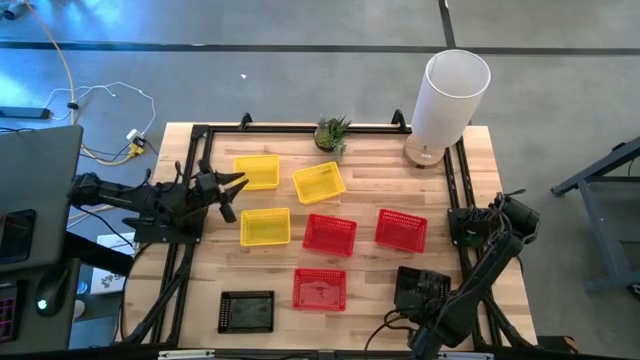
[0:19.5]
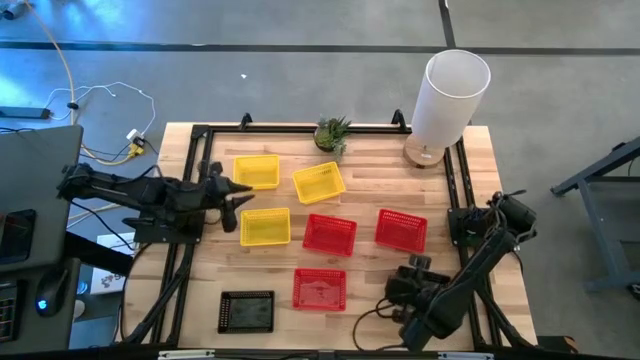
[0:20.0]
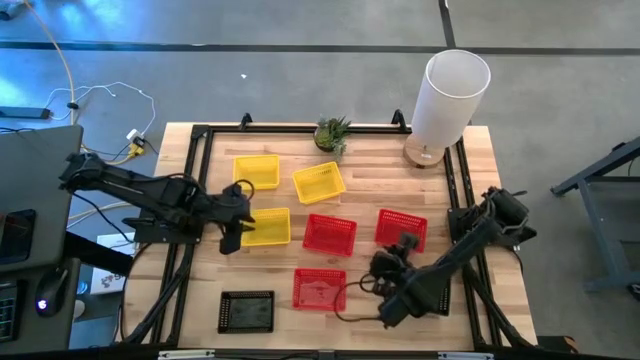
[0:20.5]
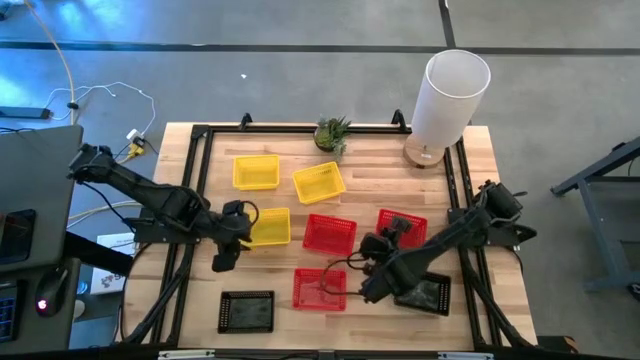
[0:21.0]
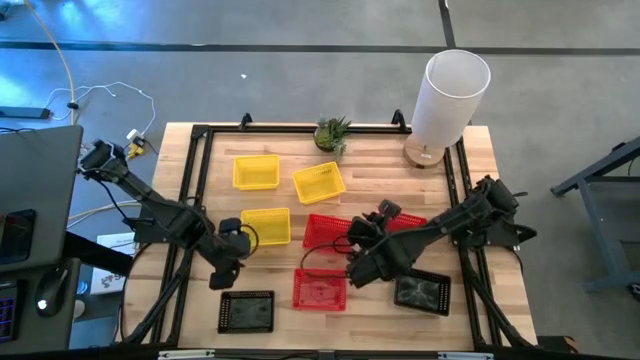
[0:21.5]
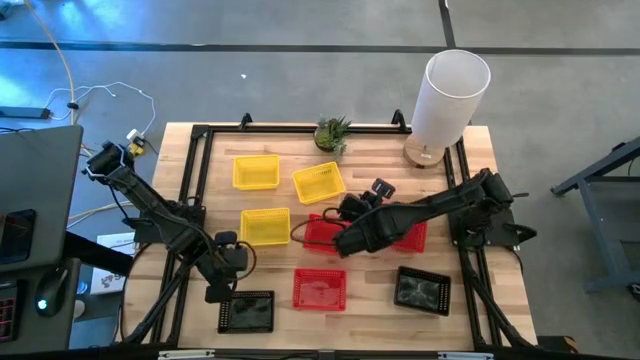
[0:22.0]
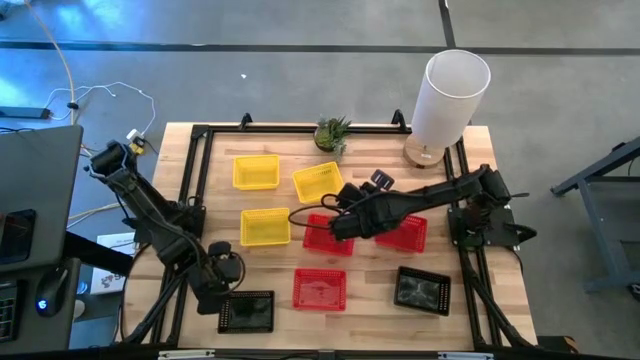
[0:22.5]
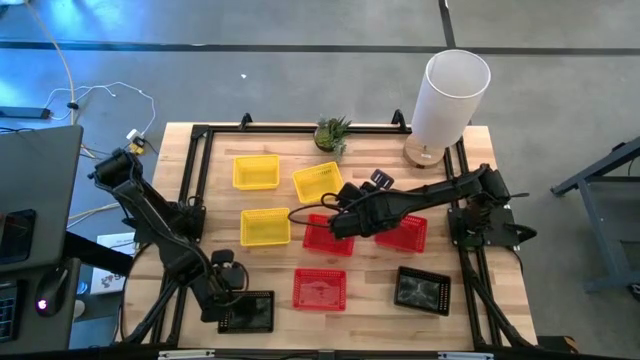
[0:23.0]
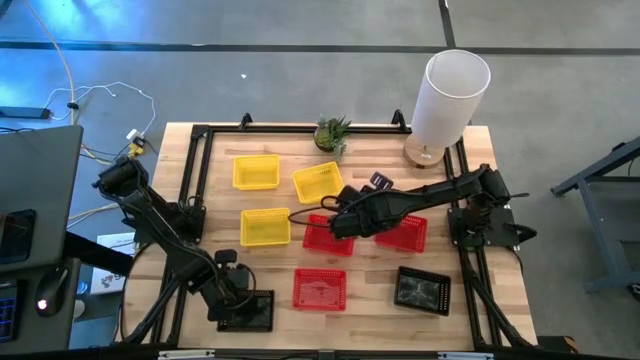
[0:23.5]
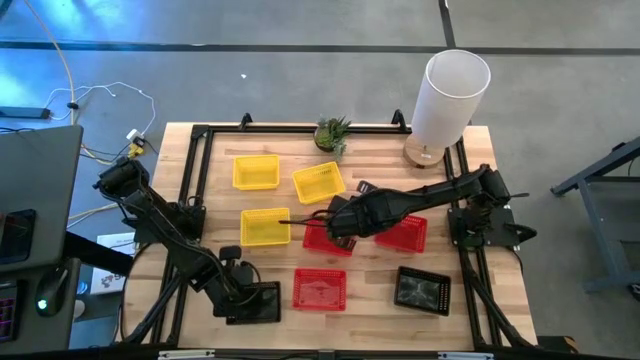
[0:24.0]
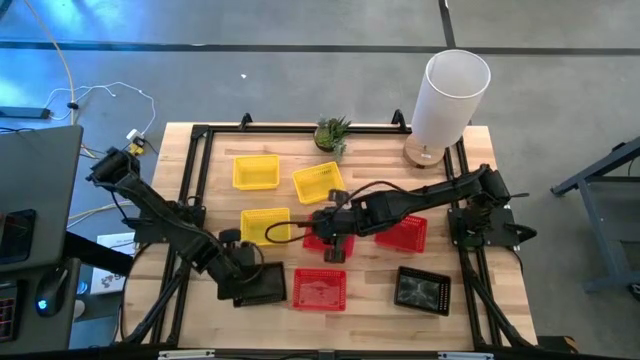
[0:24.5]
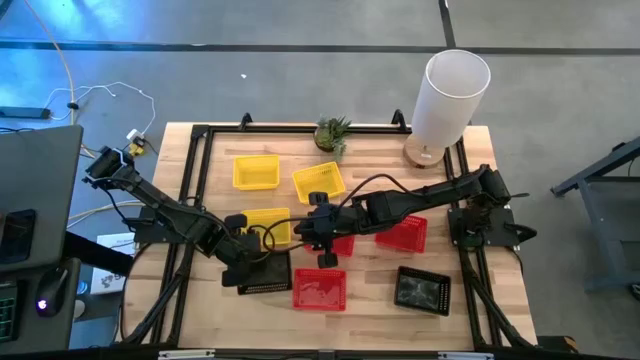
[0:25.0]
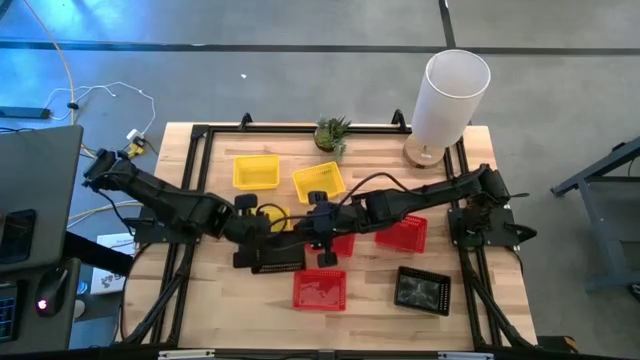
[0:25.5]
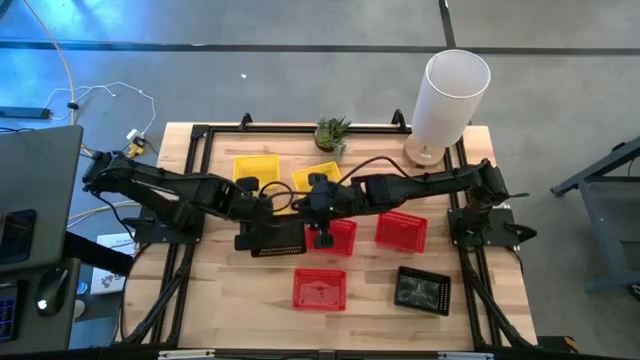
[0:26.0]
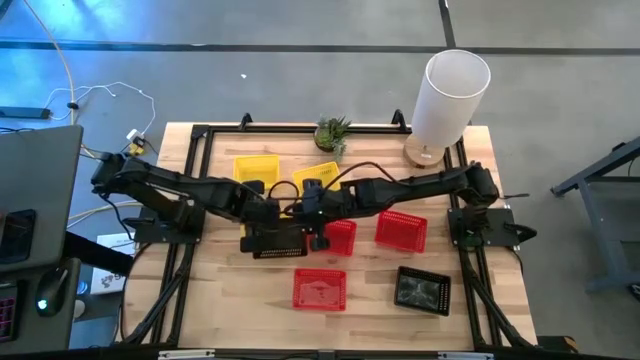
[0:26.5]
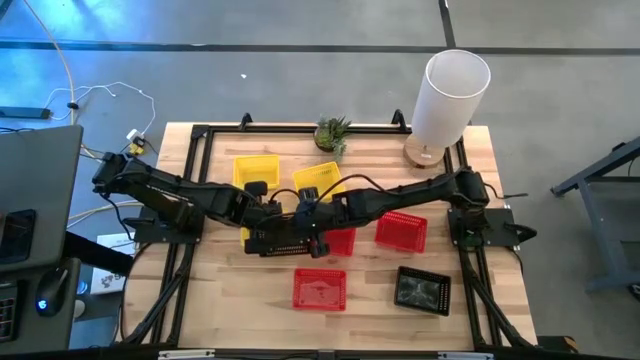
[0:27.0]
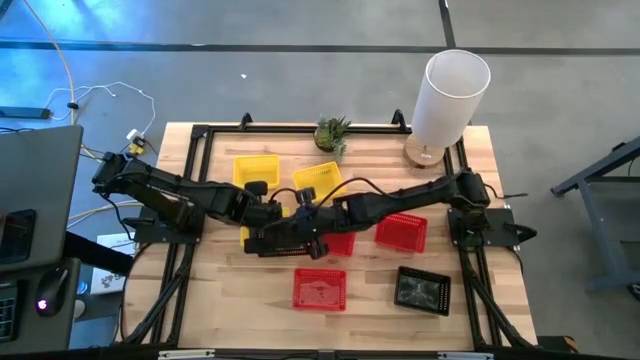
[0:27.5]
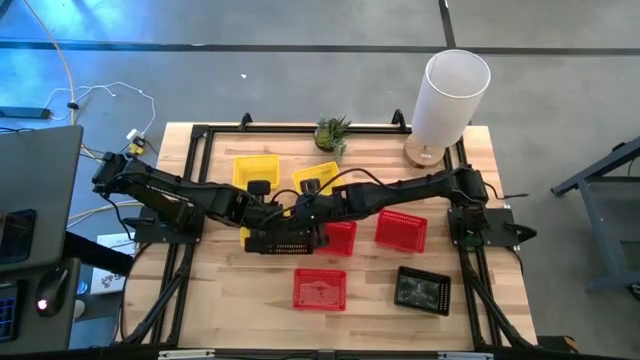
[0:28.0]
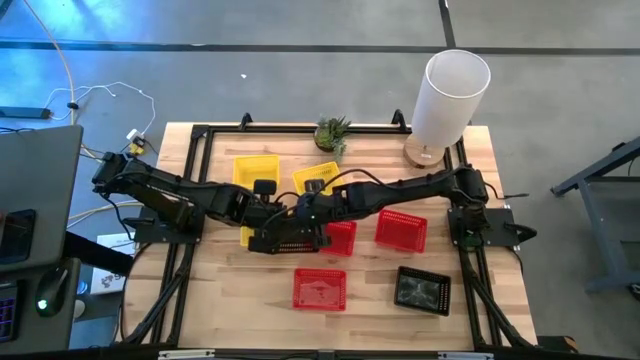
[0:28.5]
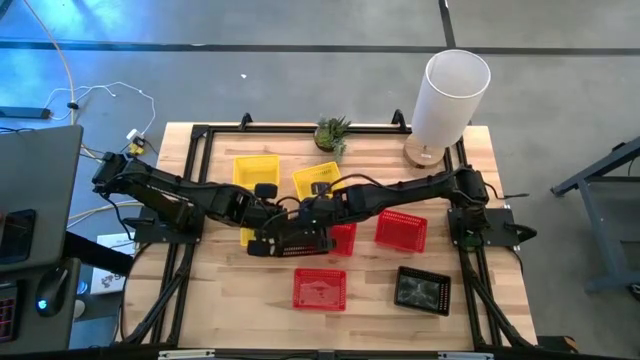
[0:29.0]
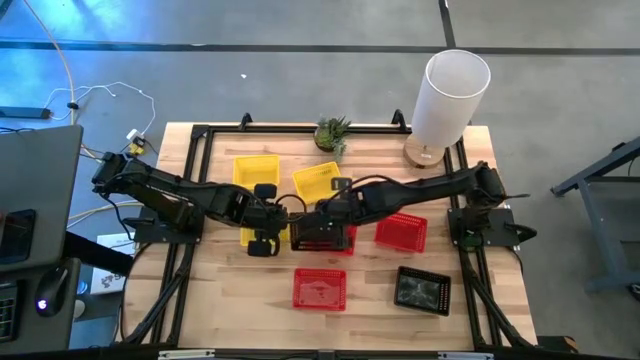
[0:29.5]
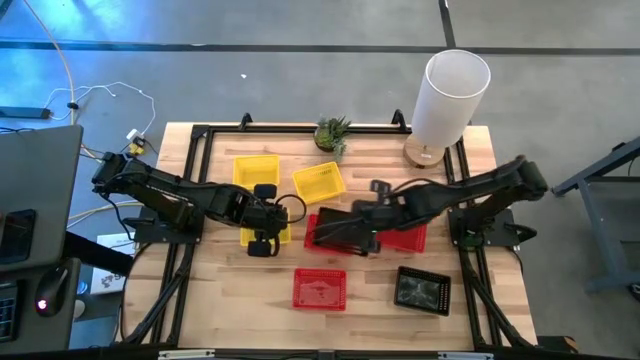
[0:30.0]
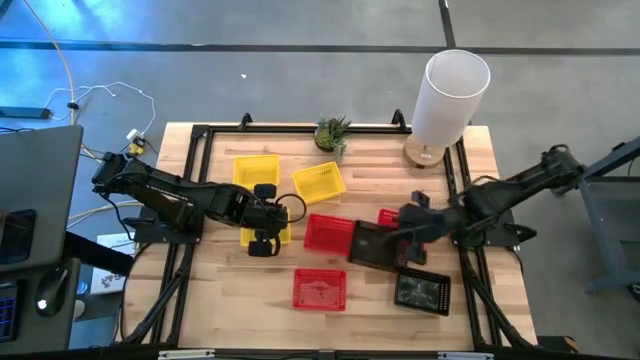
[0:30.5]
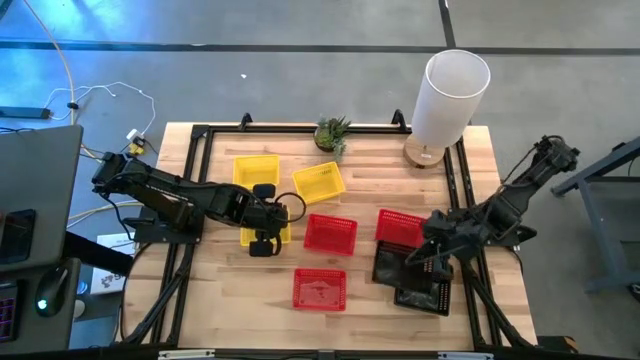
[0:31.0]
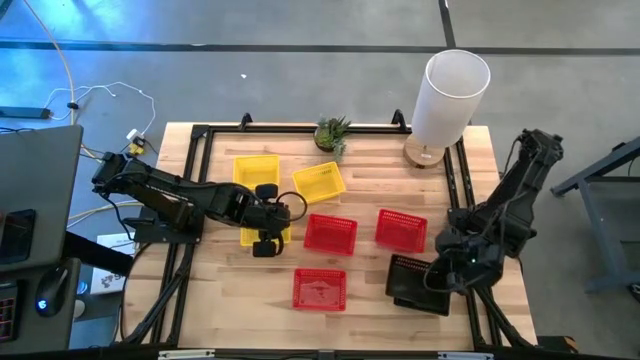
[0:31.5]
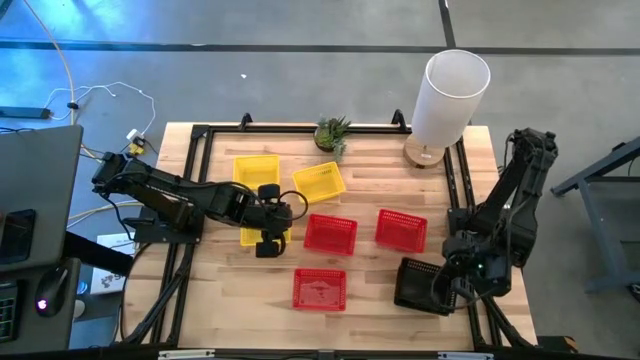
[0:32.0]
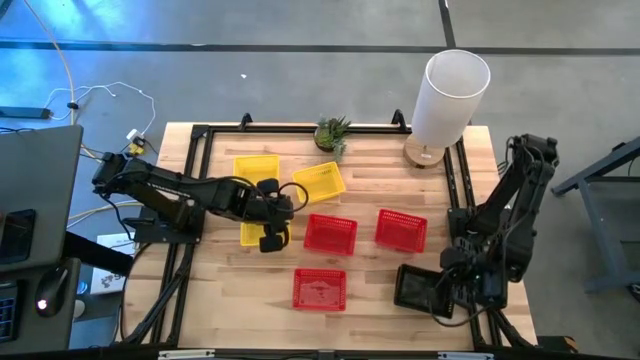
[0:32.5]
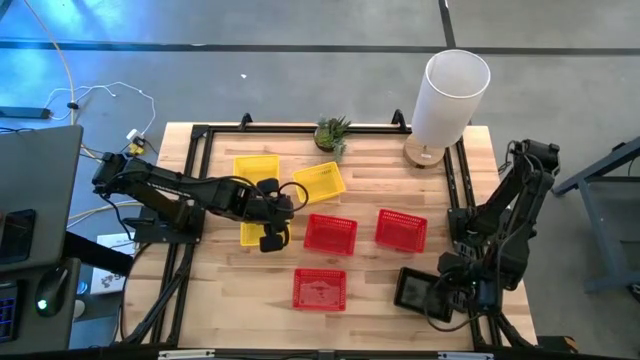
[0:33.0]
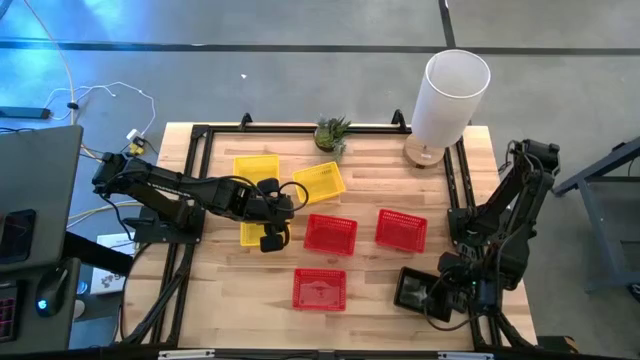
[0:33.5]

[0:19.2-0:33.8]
Stack the left black bin on top of the right stacked black bins
